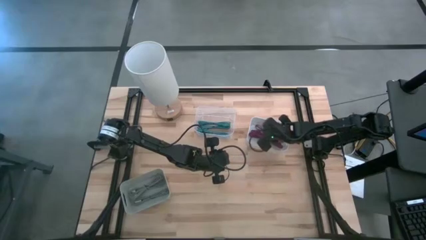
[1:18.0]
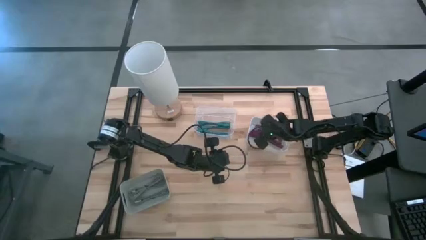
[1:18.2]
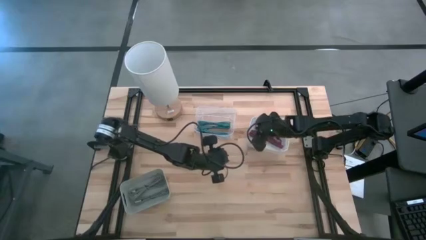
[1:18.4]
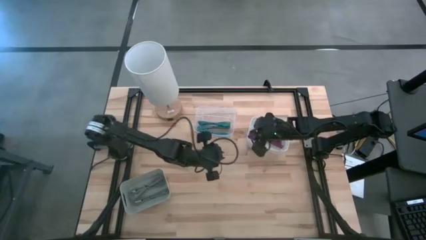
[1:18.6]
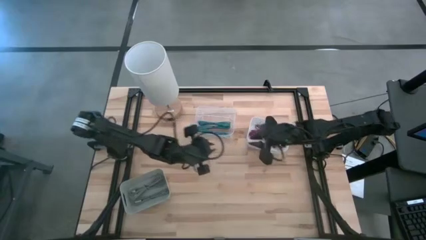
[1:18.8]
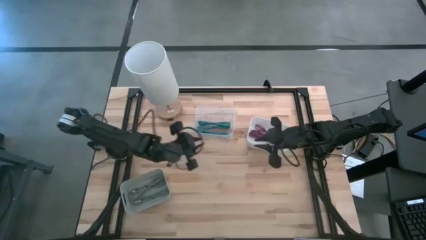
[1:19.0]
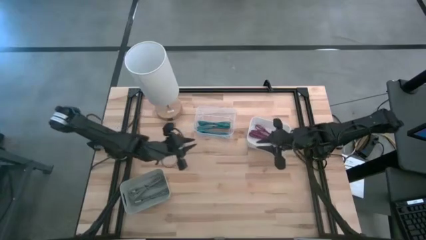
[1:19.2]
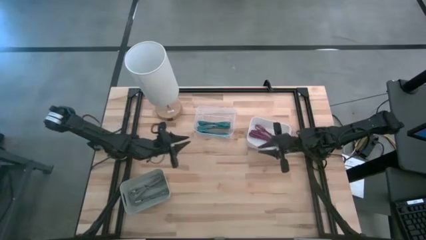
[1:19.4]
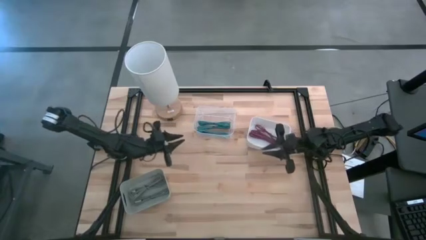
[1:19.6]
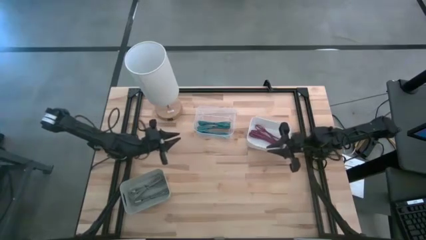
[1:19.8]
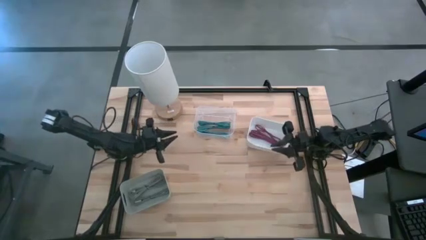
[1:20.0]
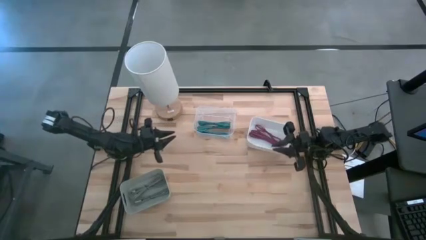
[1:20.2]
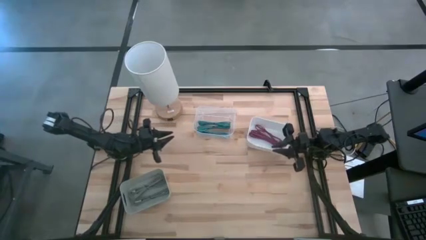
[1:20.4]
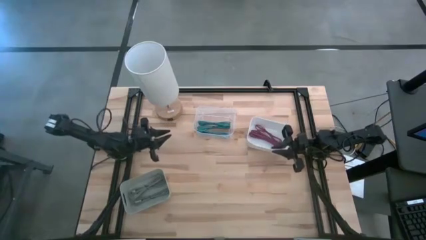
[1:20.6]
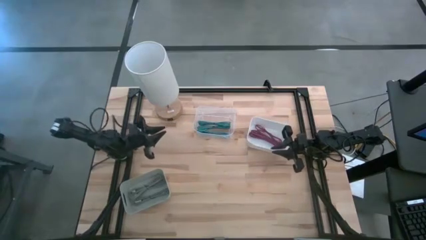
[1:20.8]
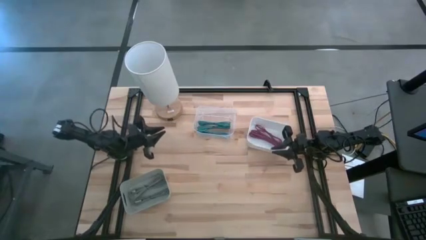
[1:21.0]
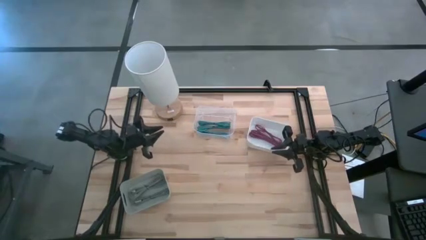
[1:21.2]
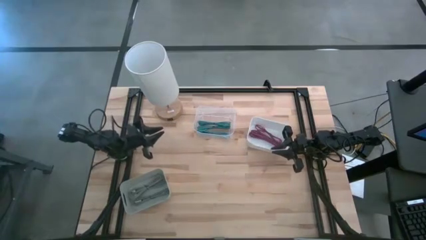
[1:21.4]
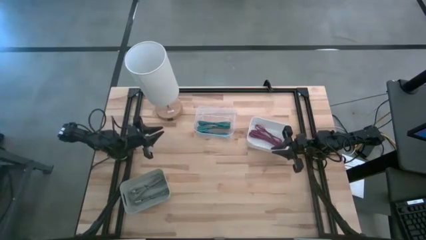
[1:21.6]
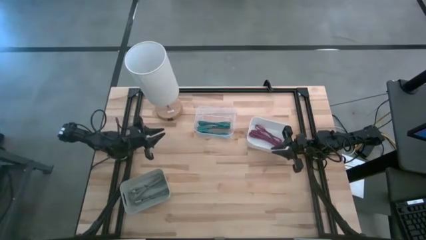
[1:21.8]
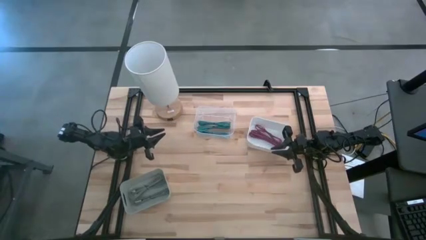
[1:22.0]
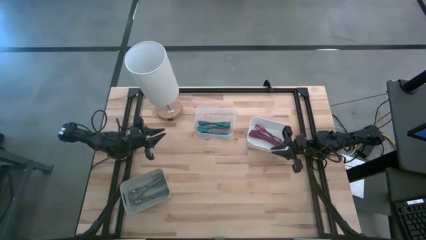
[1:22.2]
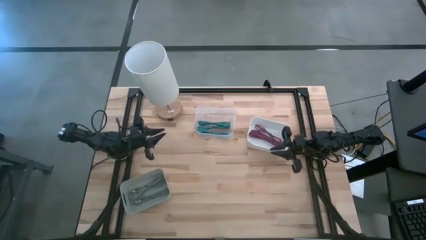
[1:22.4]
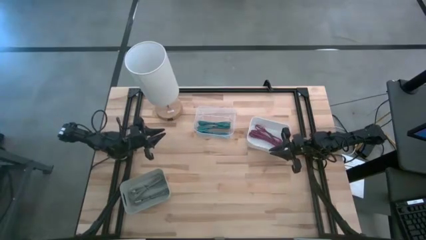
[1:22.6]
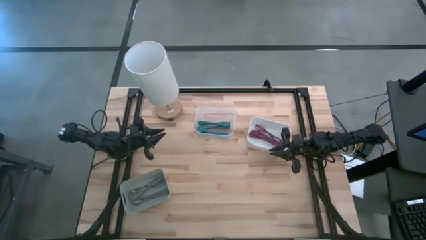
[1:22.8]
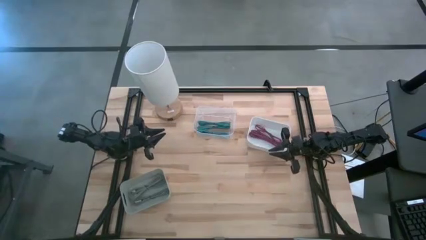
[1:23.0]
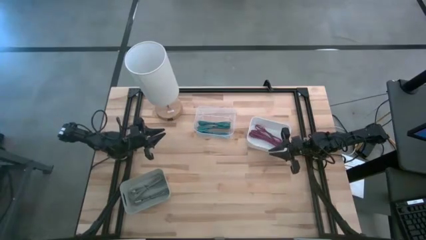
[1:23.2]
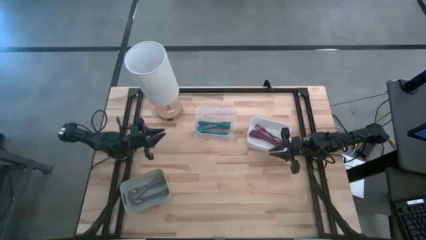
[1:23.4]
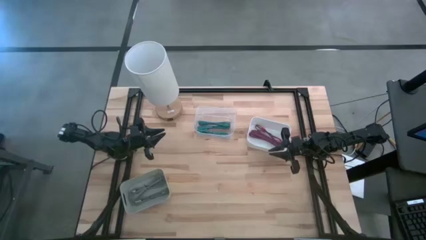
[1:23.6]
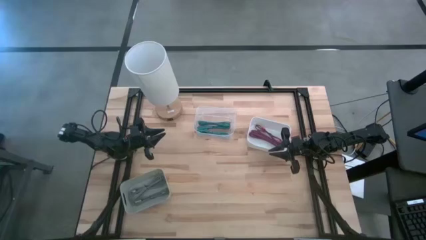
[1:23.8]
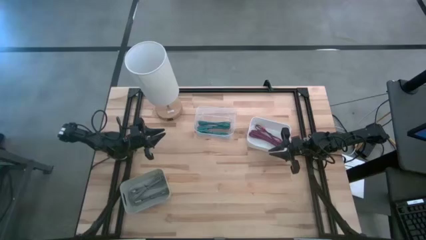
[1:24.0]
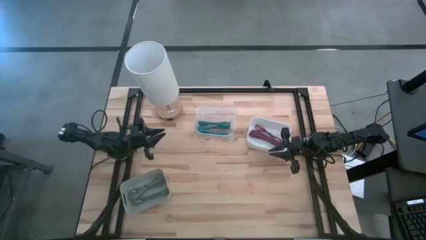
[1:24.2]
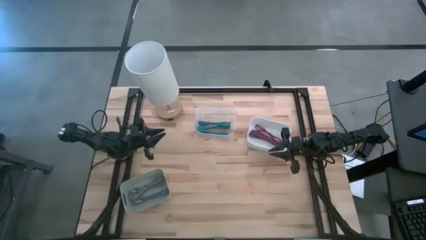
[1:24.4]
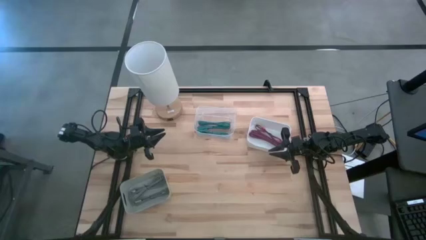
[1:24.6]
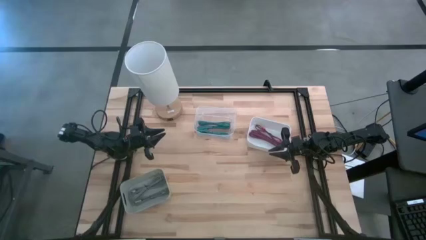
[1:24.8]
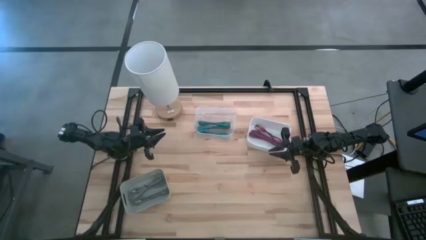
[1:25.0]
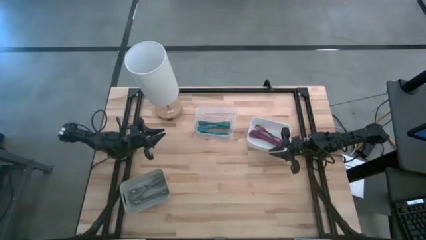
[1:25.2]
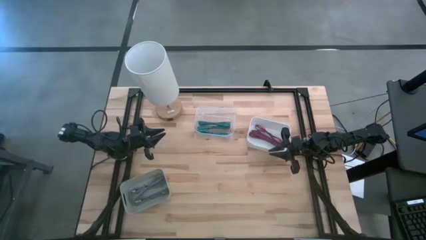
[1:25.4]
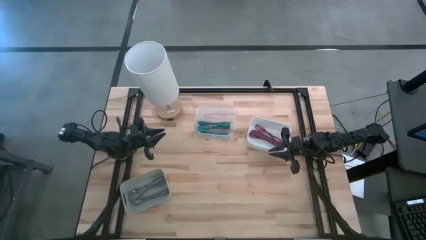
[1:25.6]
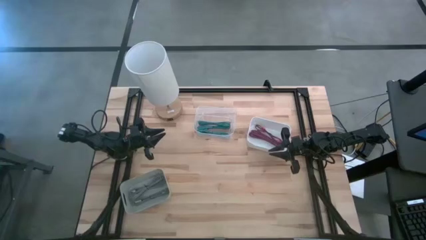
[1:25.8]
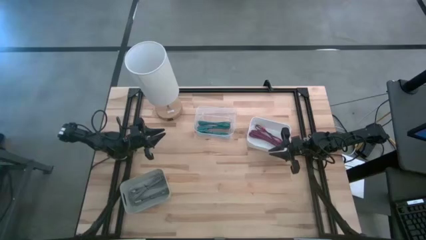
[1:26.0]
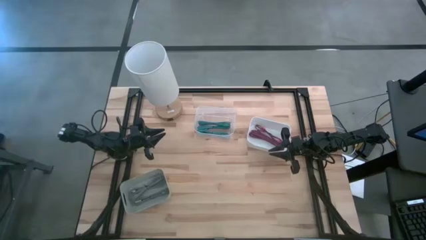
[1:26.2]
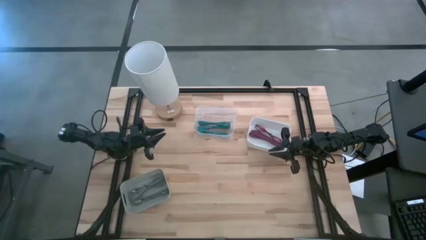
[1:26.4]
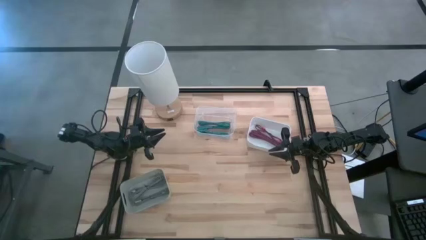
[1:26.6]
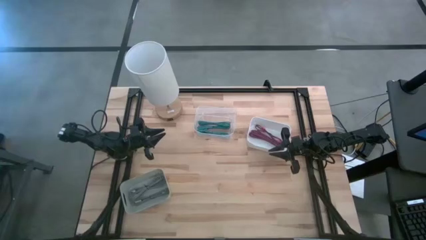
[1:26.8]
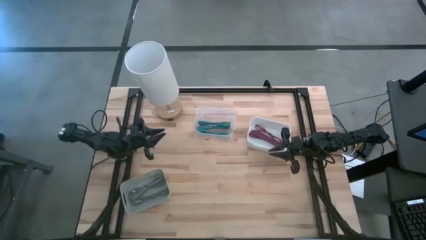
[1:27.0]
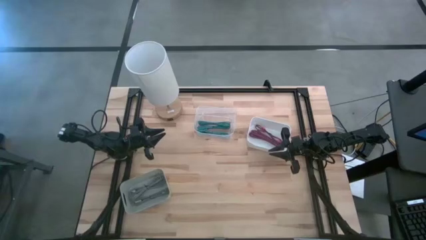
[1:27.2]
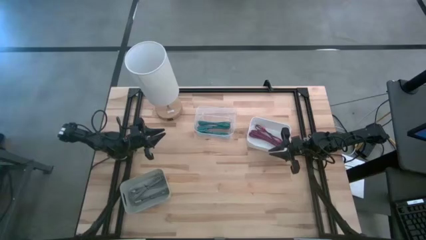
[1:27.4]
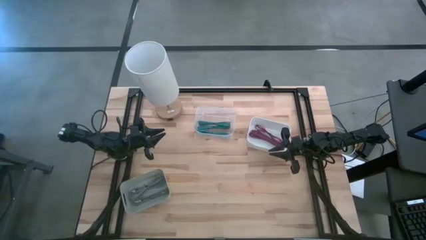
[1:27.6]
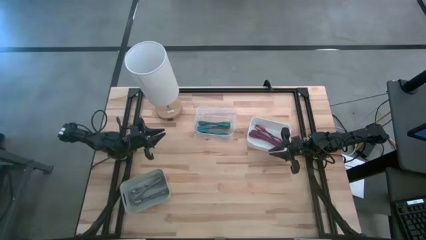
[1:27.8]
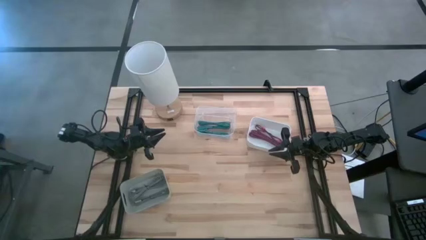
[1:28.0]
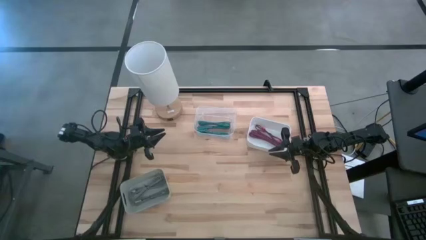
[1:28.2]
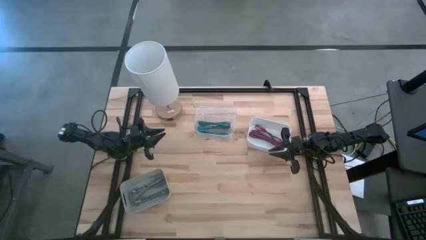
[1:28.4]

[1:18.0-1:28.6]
Task: Pick & Place USB Port
Return to Home Position

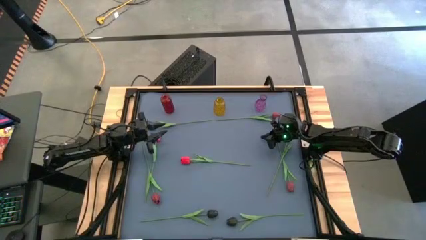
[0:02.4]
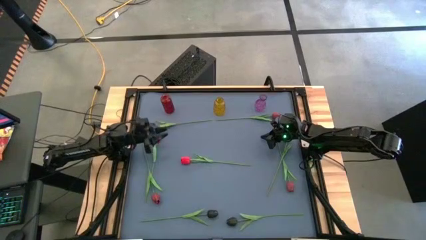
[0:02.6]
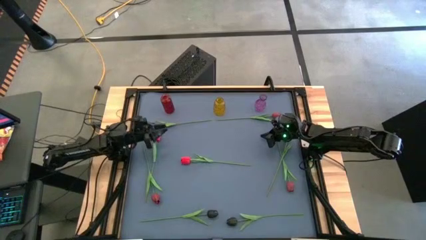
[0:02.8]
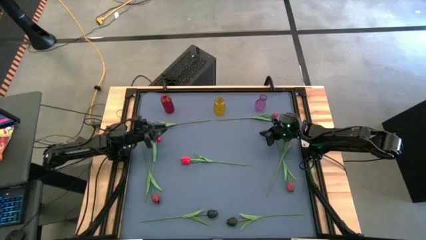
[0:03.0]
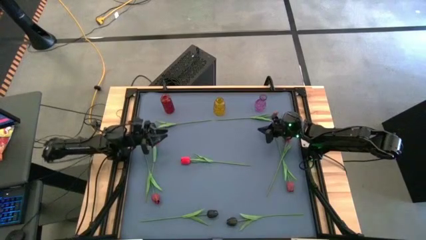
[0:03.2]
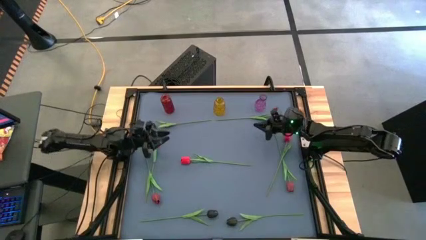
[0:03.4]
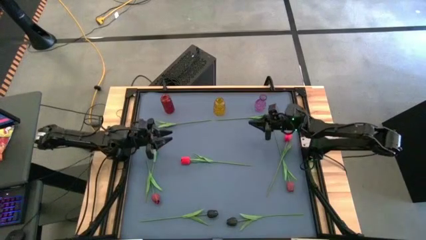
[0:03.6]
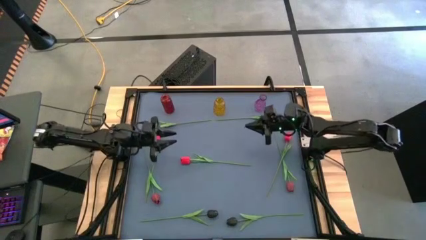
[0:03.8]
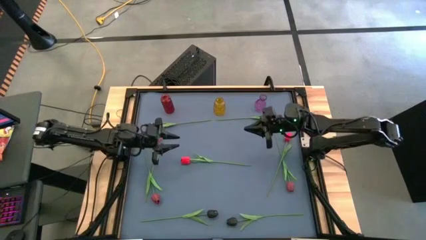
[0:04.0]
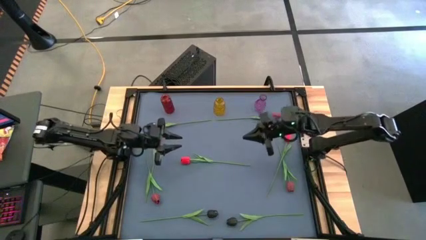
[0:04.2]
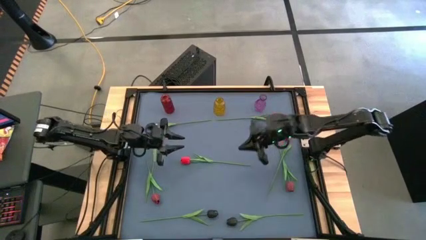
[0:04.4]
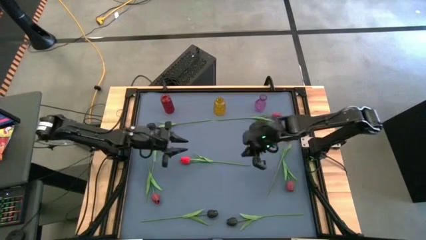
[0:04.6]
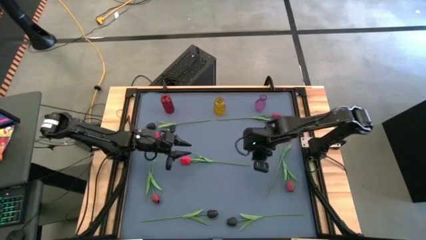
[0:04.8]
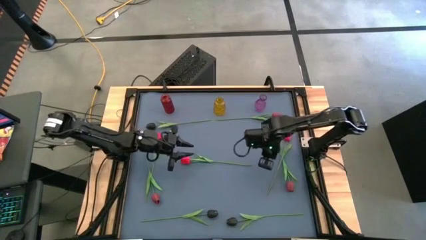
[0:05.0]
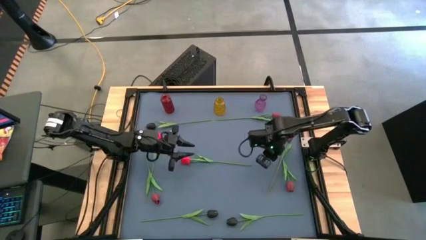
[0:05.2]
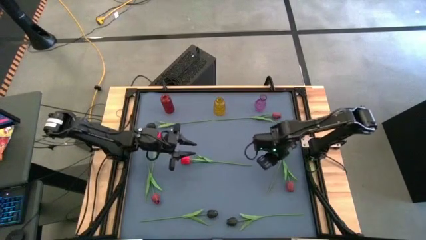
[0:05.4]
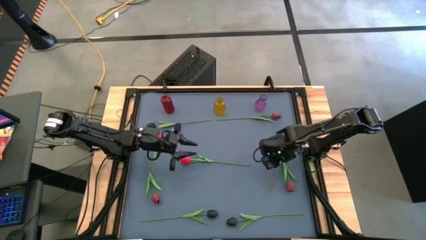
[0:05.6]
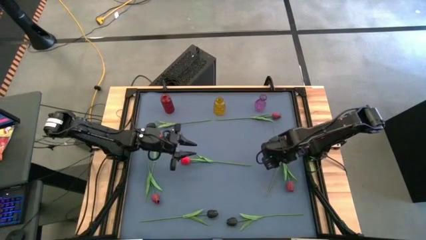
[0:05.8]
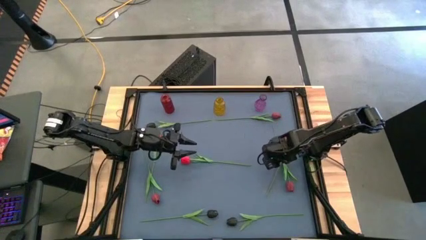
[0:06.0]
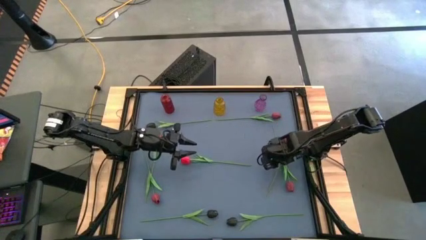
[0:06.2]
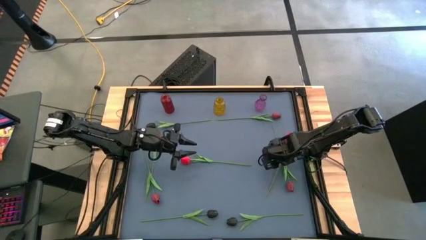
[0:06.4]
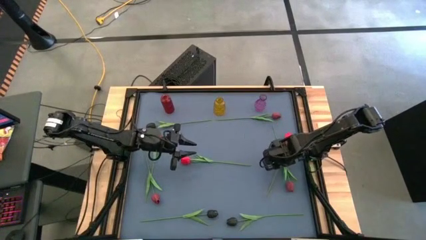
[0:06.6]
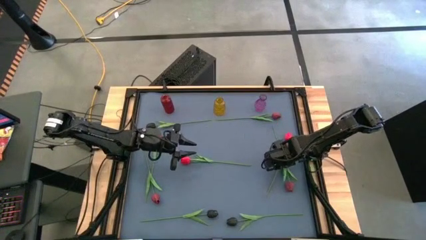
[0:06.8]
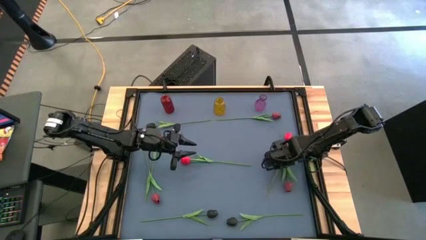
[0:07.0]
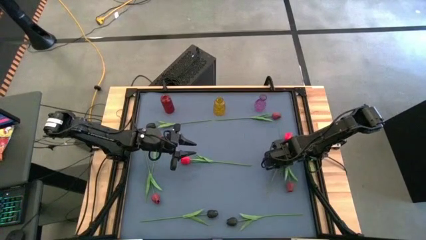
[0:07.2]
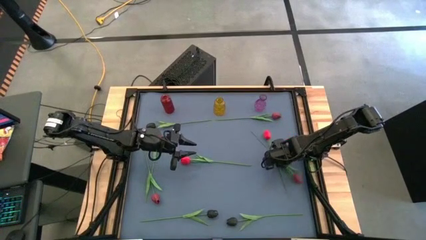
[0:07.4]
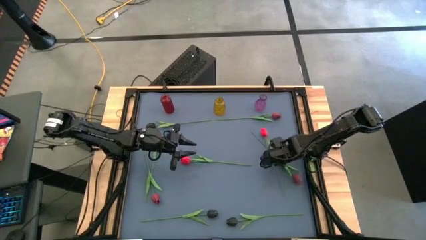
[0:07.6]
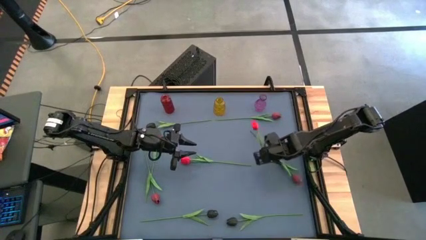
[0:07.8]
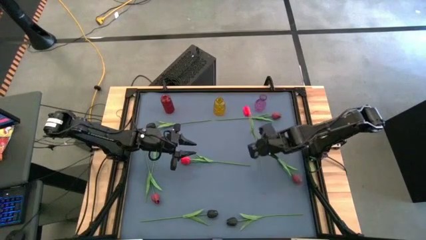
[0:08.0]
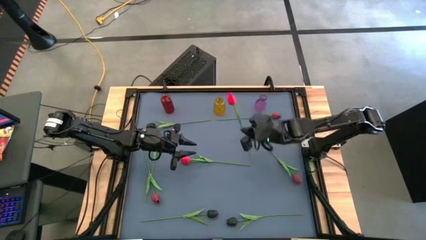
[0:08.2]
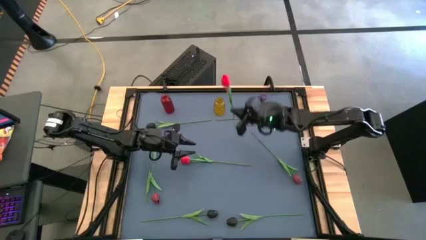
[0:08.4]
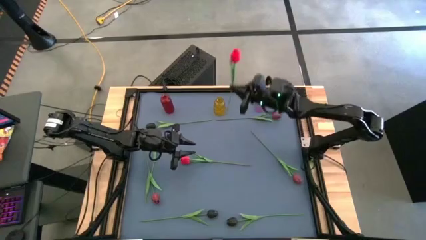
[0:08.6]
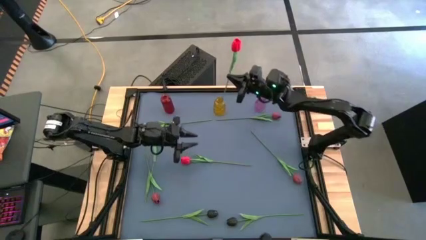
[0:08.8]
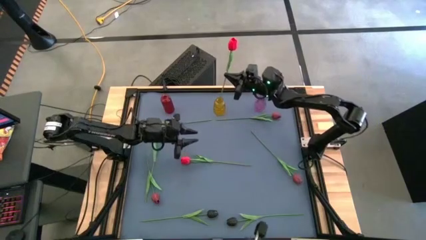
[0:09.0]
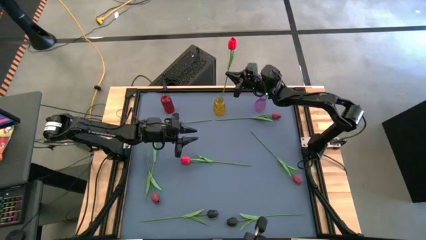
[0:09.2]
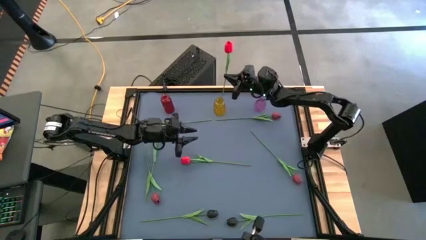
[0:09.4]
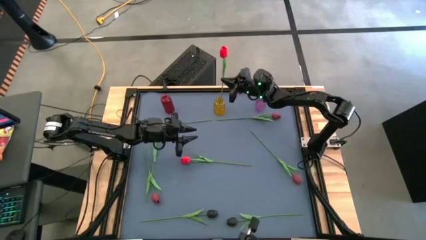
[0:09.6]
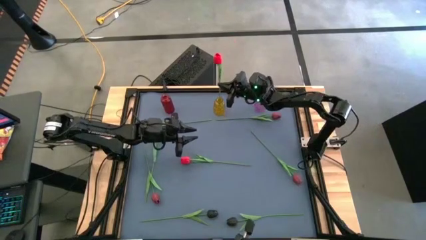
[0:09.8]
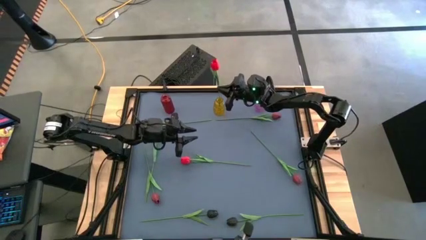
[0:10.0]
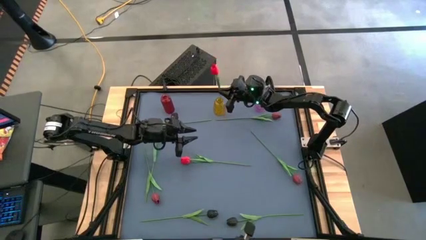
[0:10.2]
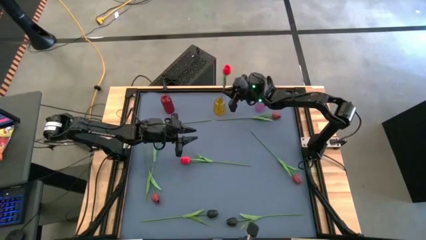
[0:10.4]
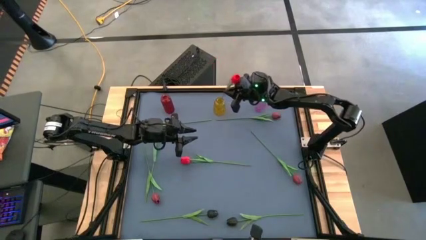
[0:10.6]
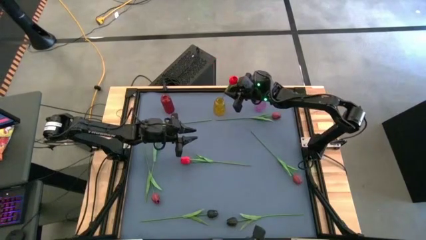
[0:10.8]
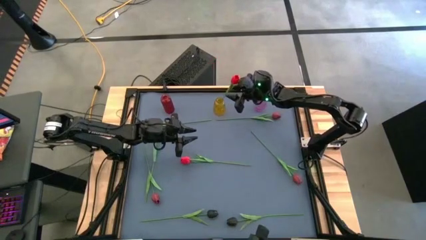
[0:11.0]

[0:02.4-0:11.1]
Task: Sort flowers into vase by color
Put the right red tulip into the yellow vase
